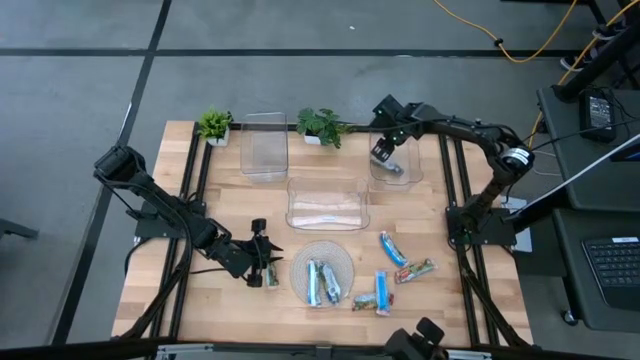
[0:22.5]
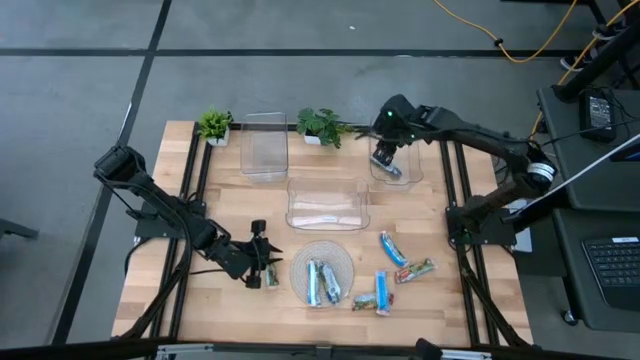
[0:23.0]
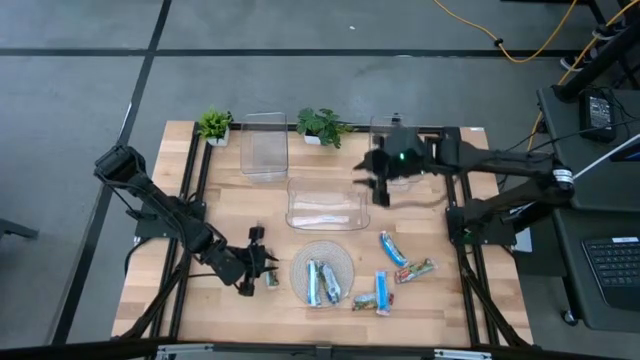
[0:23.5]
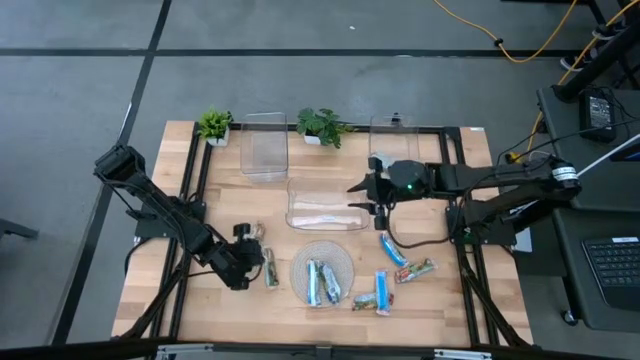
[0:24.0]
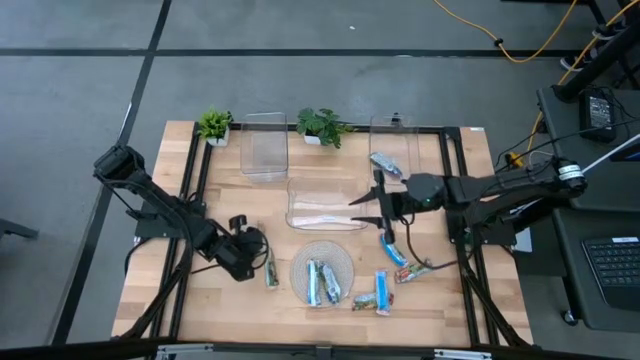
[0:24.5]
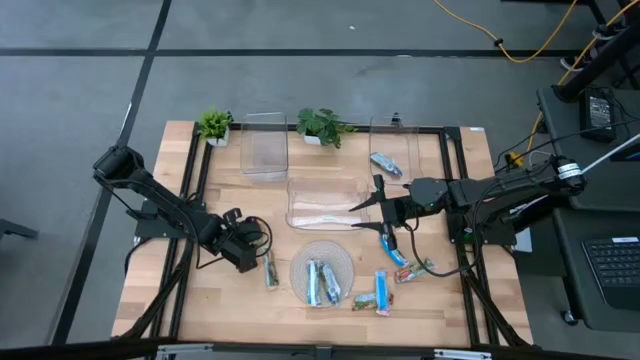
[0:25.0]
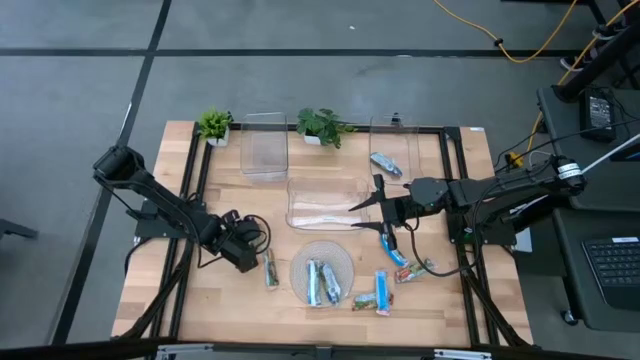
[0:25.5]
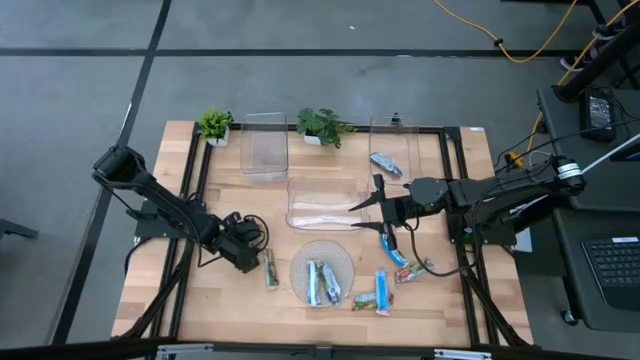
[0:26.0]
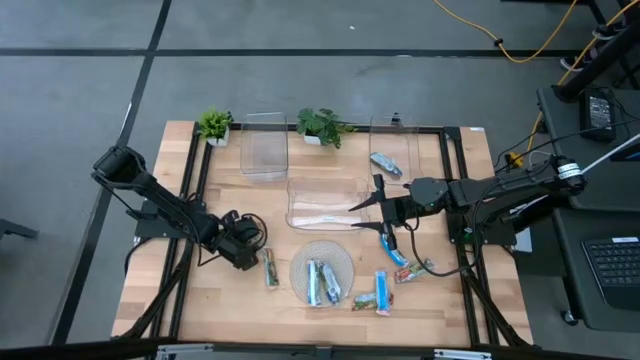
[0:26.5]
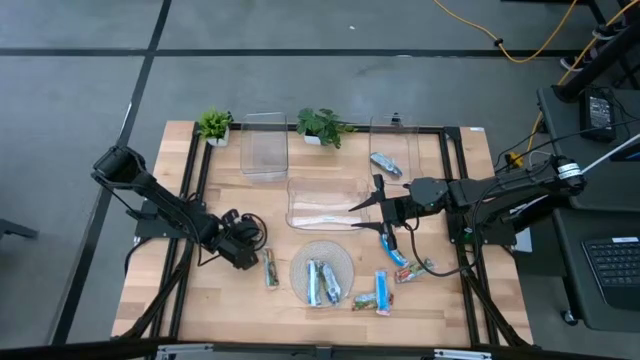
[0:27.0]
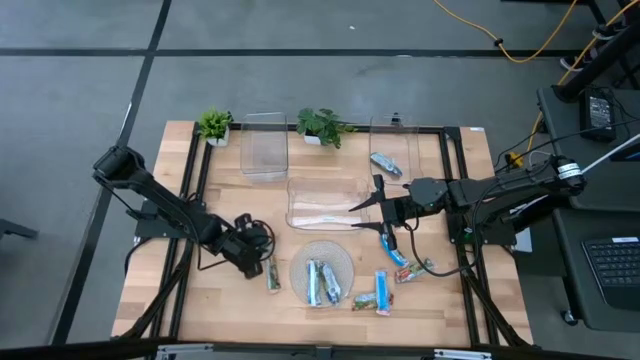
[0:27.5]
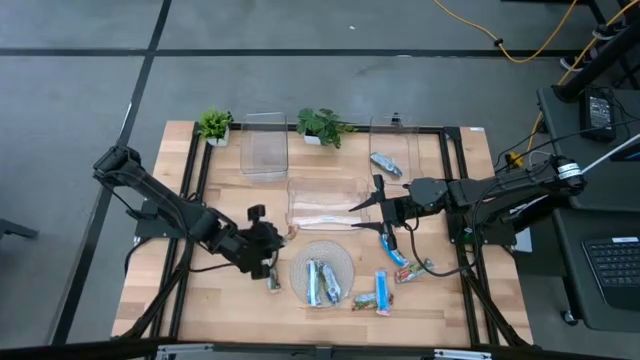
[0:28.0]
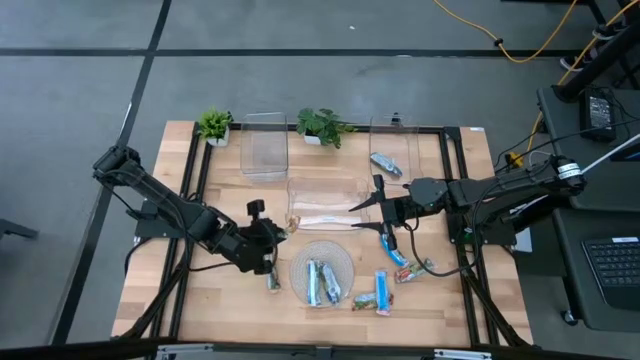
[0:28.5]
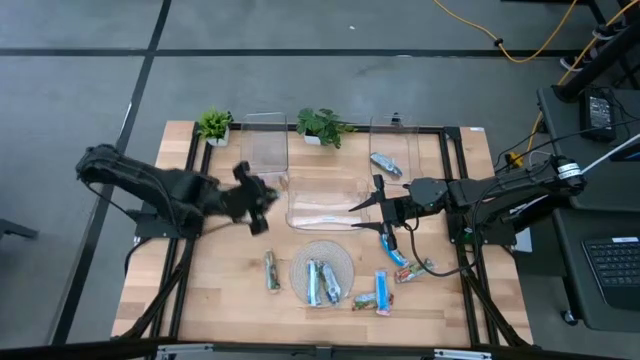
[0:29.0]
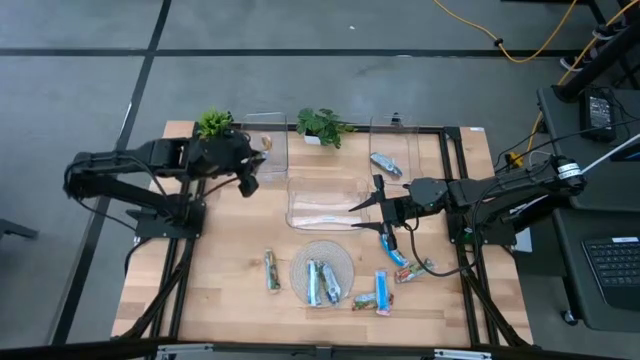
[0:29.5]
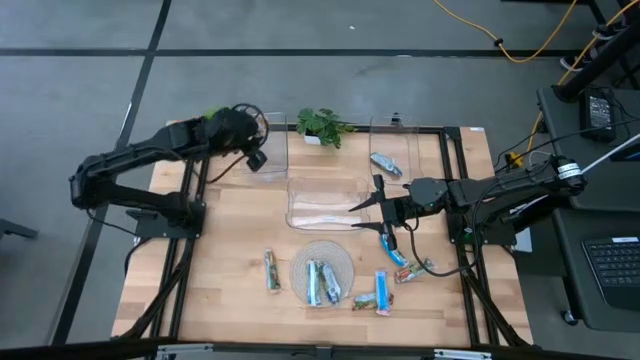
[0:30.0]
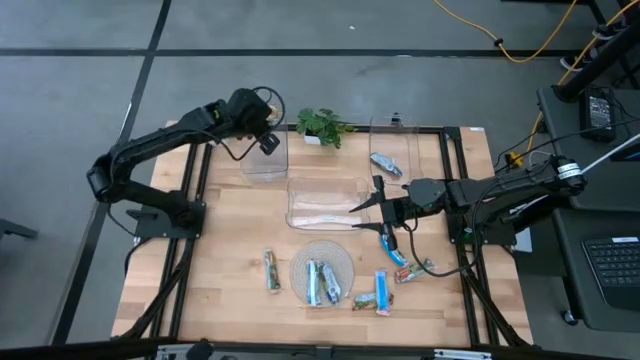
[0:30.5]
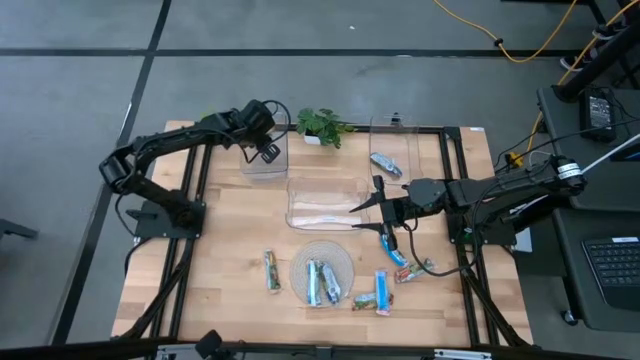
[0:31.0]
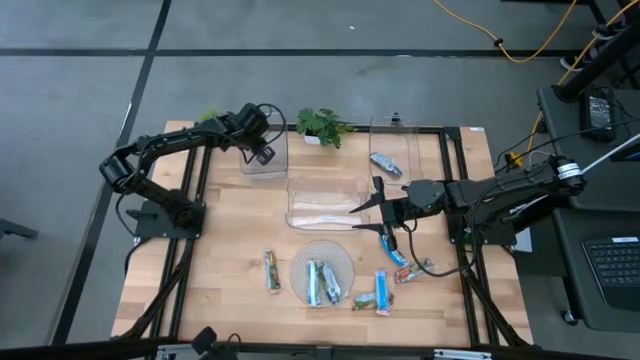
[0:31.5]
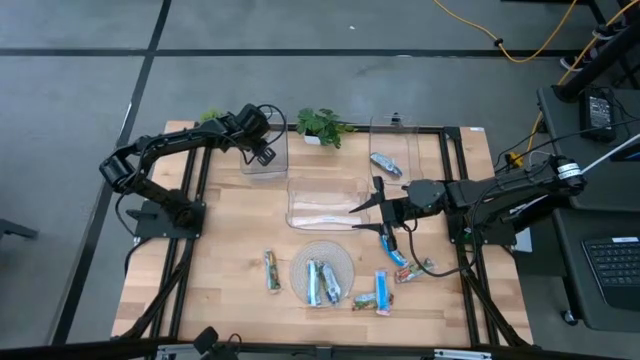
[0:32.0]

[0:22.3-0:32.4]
Task: Pick and place Granola Bars by type
Put the orange granola bar into the top left transparent bin

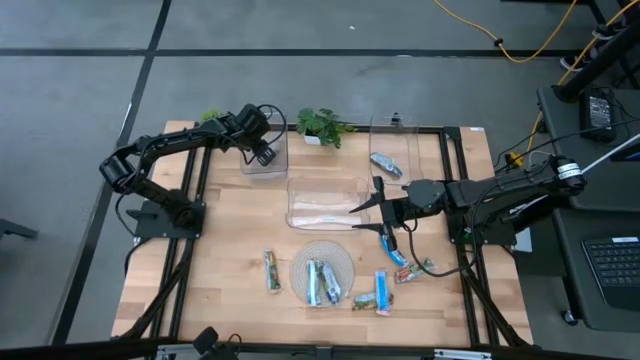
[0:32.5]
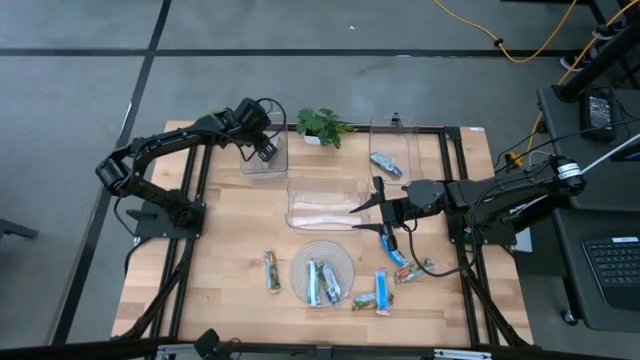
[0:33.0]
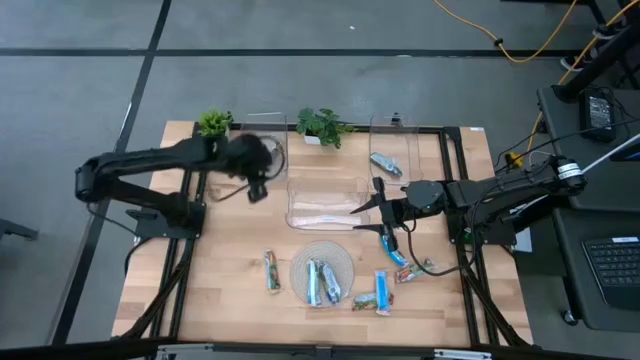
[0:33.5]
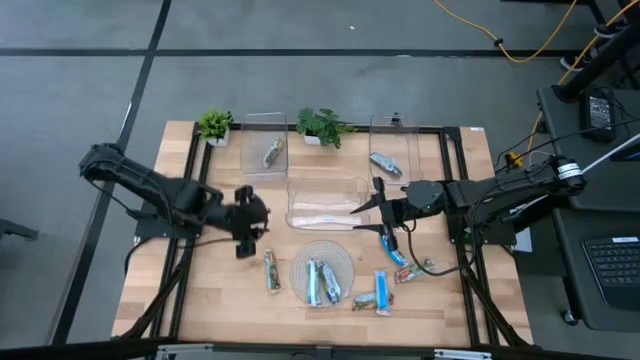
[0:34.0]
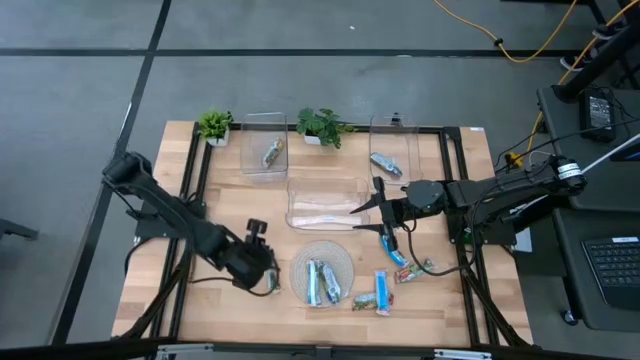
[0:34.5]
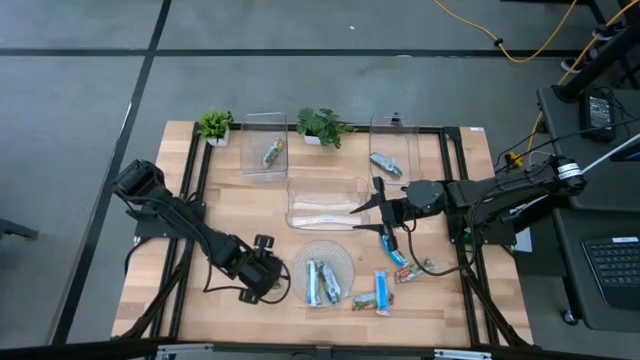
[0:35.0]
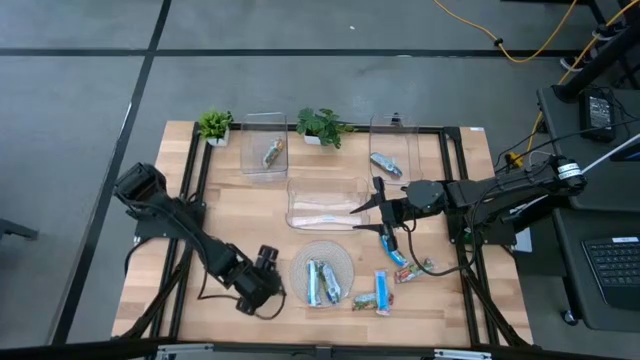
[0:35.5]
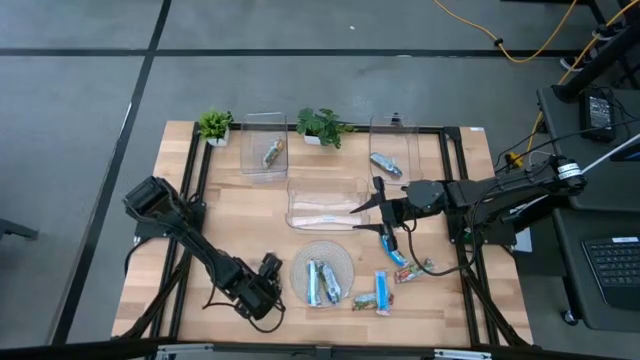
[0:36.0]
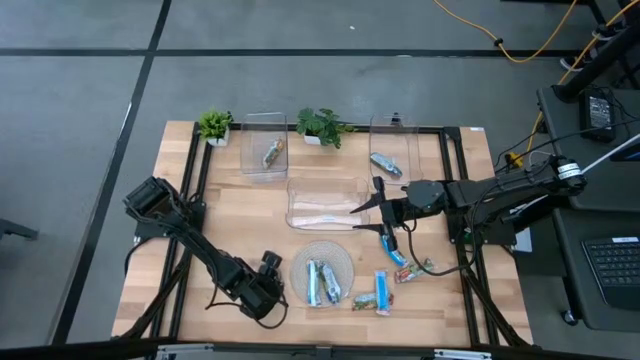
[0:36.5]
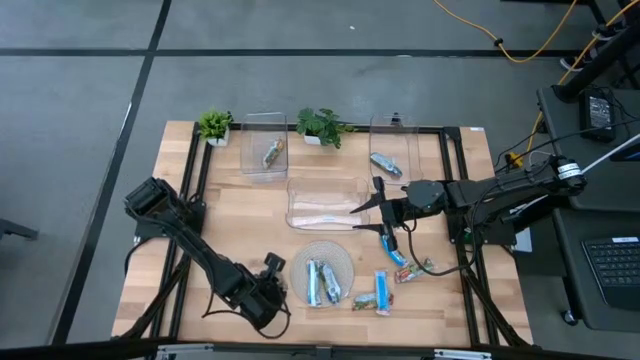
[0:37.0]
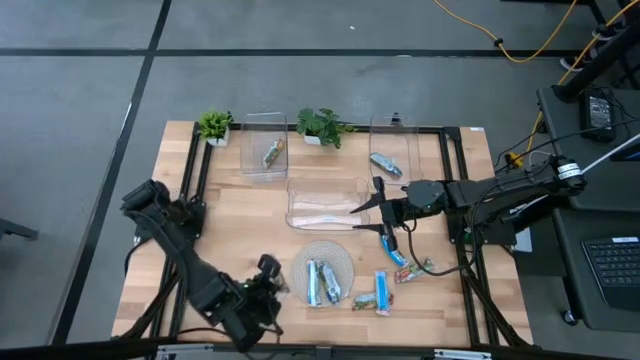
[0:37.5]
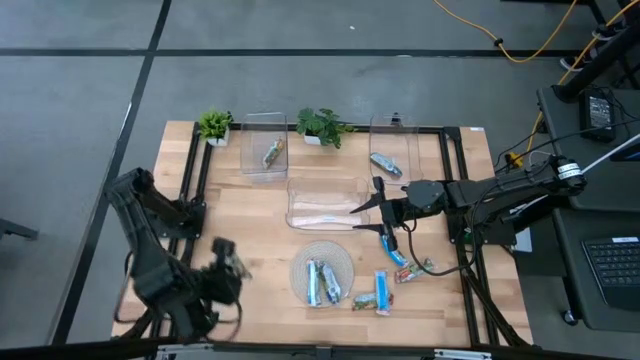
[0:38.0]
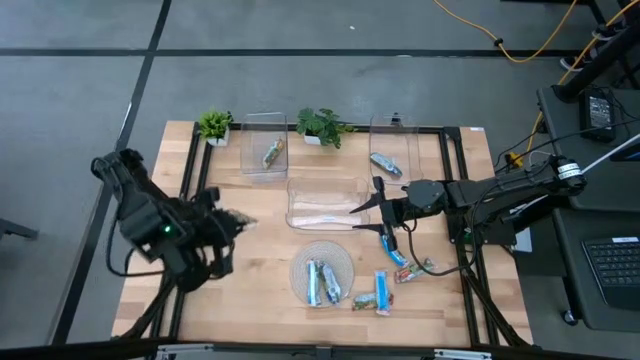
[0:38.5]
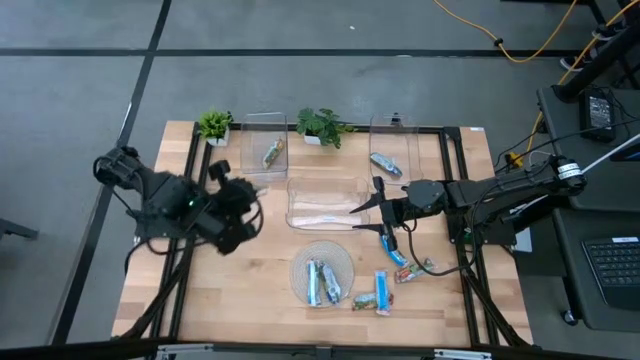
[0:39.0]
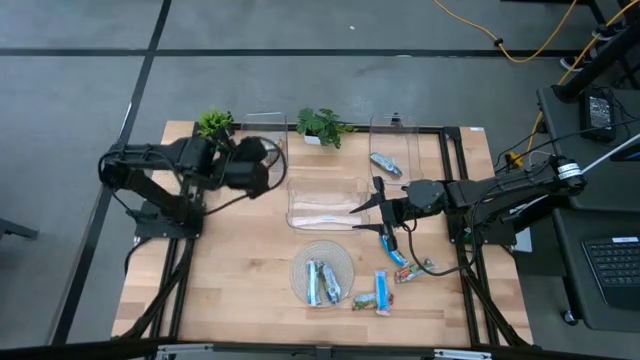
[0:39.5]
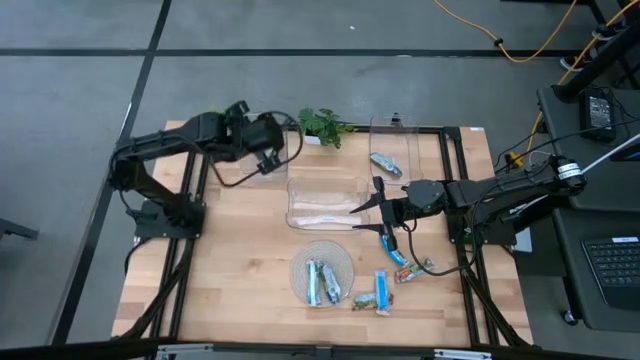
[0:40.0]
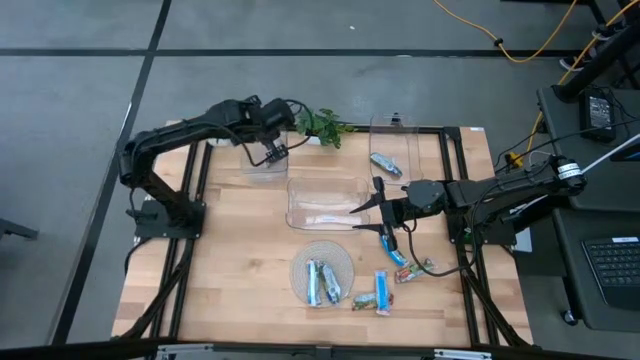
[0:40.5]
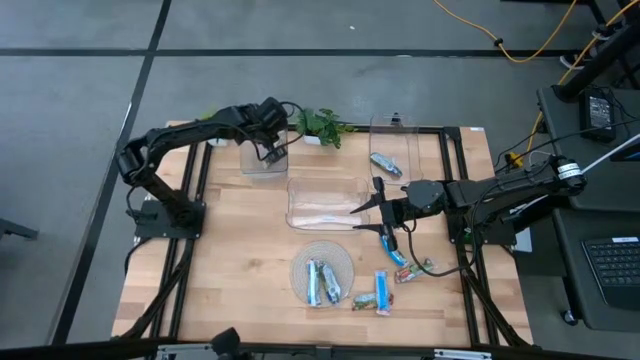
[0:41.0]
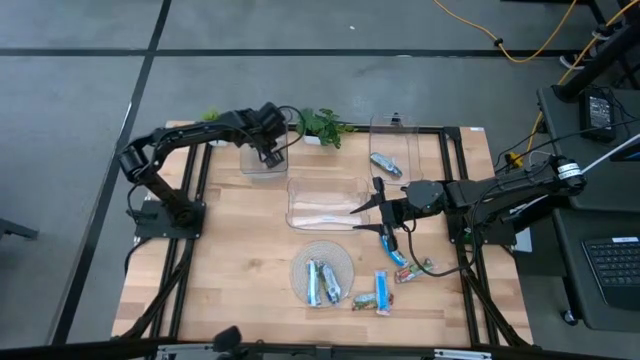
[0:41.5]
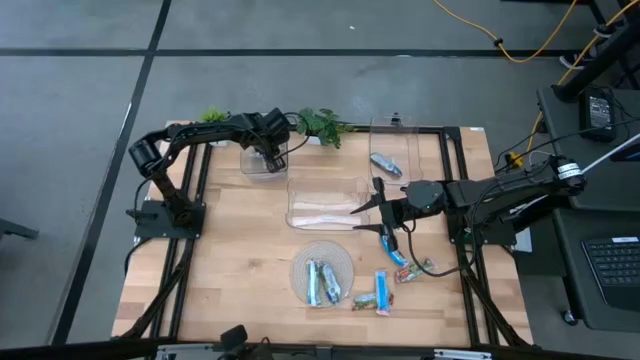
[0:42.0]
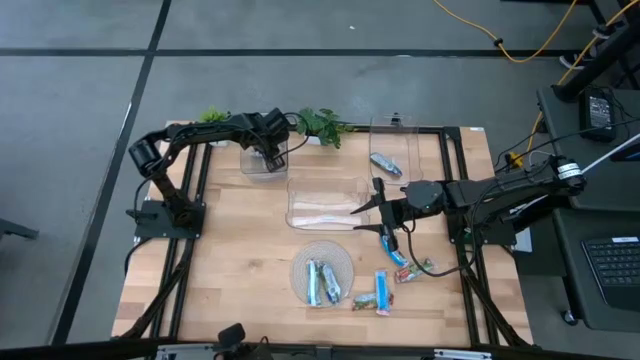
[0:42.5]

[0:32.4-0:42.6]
Put the orange granola bar into the top left transparent bin

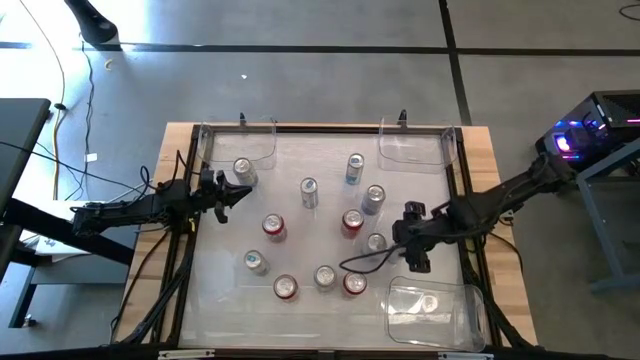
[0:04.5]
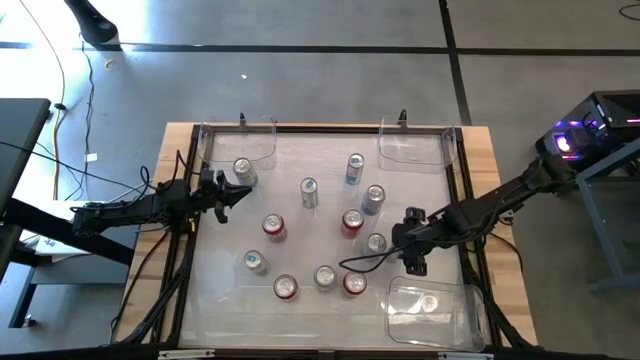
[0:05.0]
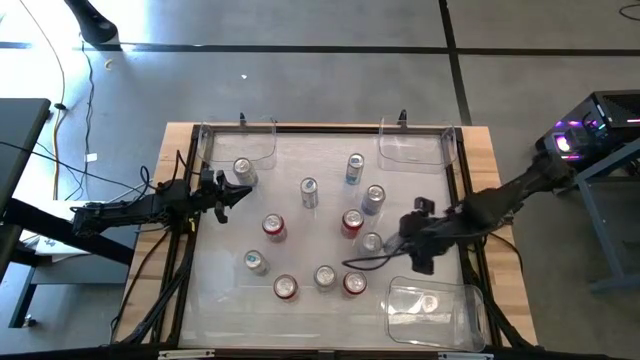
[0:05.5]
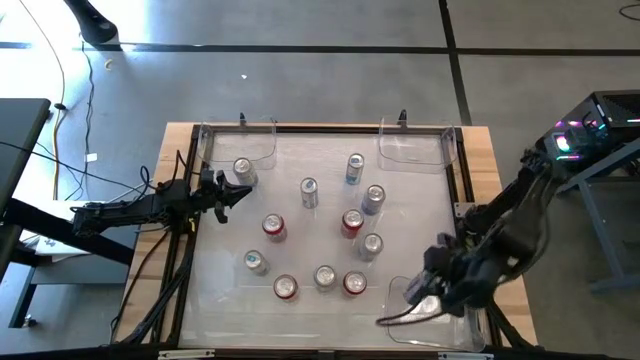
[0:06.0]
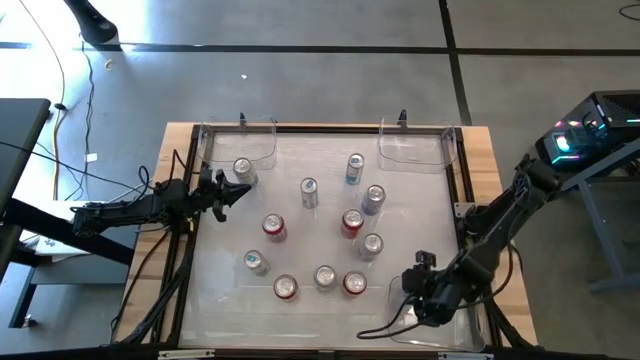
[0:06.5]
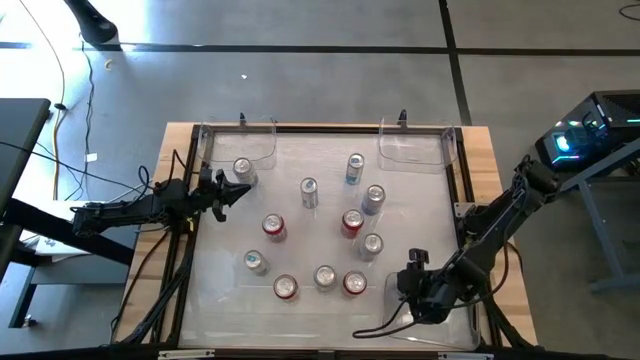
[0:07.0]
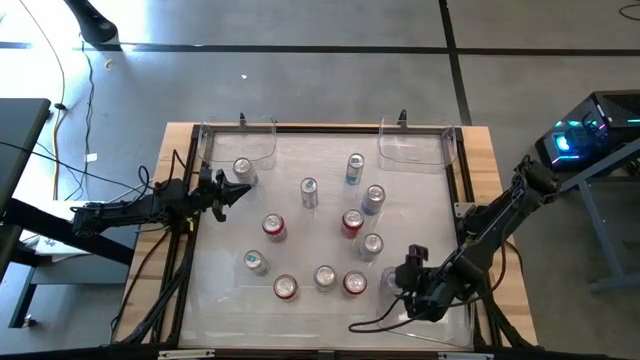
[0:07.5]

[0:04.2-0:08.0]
Task: Sort soda cans
Put the blue soda can into the bottom transparent bin
